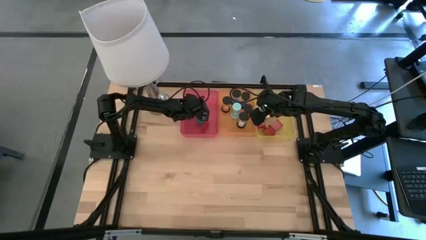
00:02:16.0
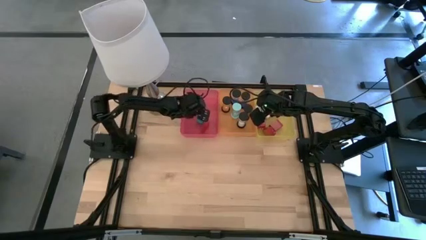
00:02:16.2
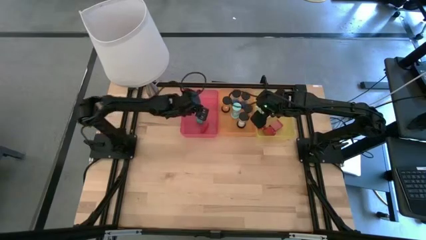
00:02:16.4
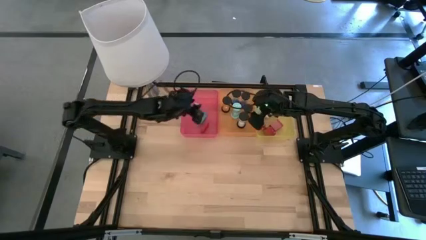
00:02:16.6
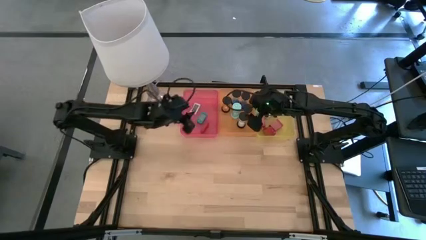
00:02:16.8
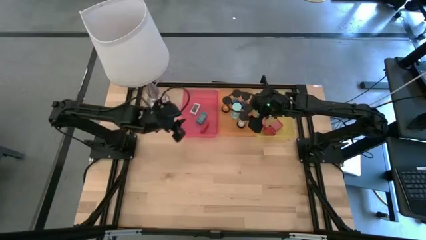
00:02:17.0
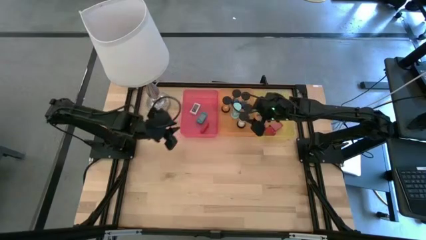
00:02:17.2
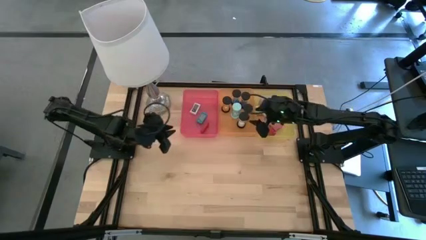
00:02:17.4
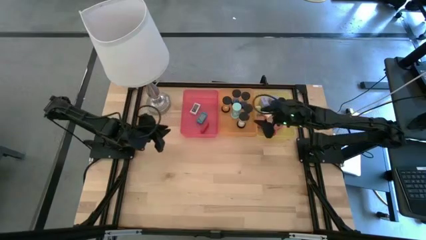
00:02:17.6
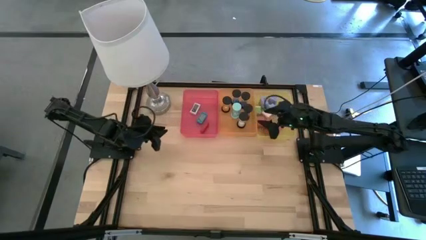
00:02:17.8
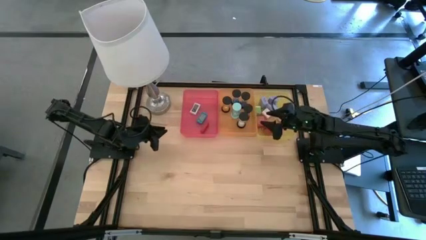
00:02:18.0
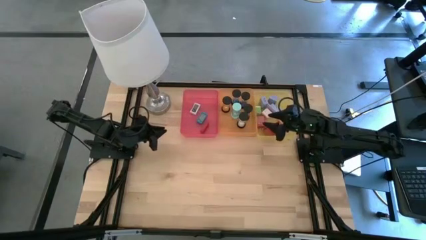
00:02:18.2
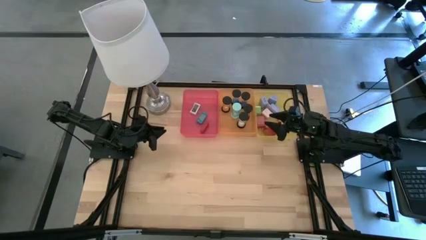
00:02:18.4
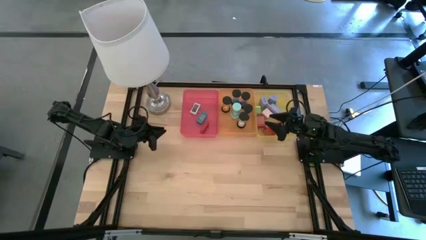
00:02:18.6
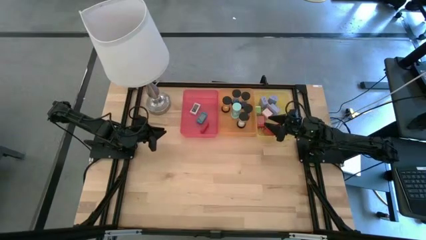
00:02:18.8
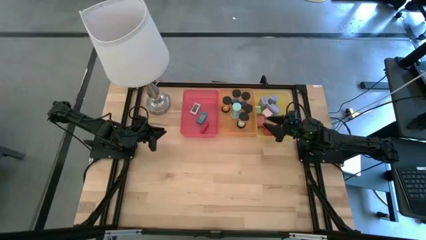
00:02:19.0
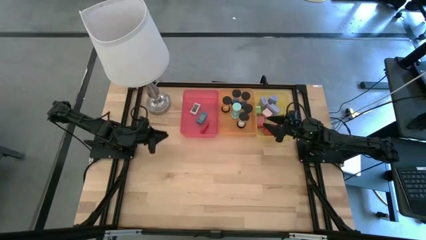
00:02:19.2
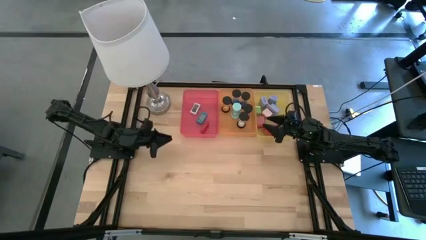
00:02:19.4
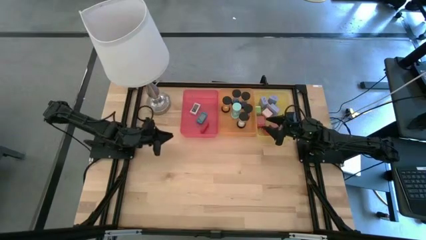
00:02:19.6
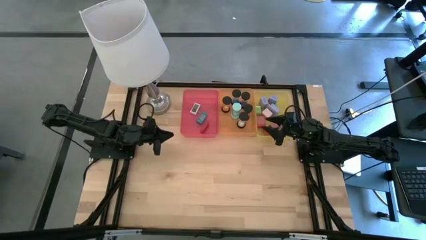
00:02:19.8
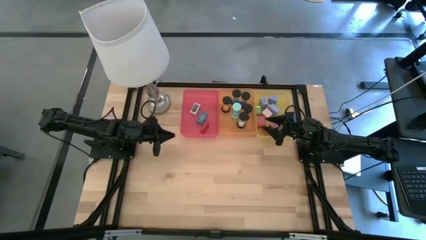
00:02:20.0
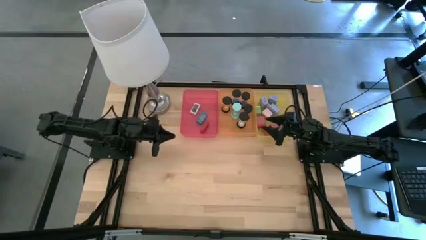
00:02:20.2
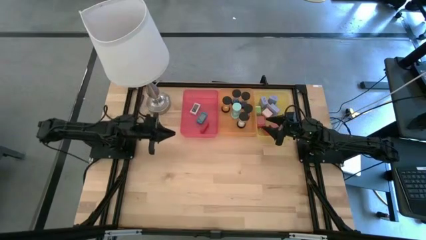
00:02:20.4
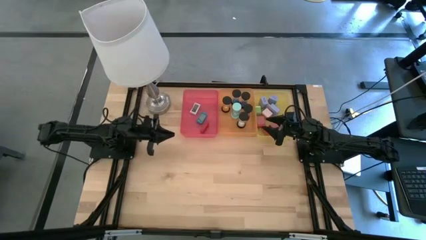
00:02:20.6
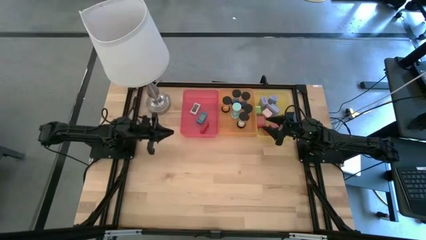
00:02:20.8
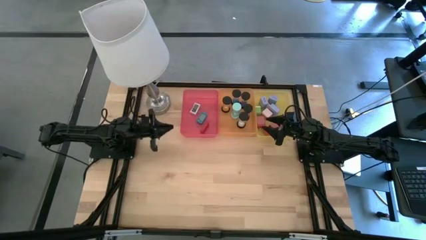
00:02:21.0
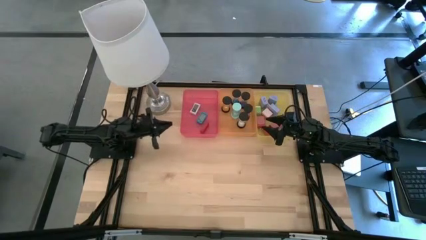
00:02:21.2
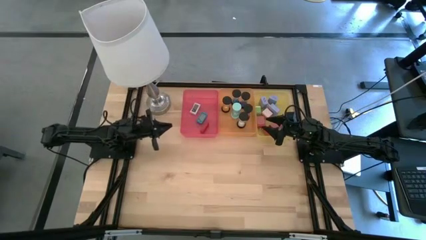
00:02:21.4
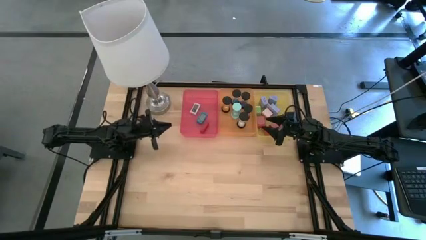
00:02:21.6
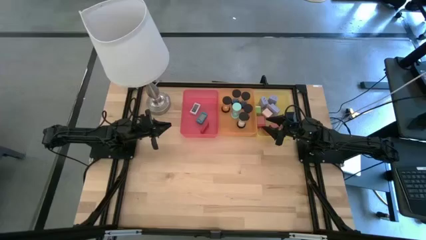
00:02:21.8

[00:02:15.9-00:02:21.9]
Task: Pick & Place Office items
Return to Home Position

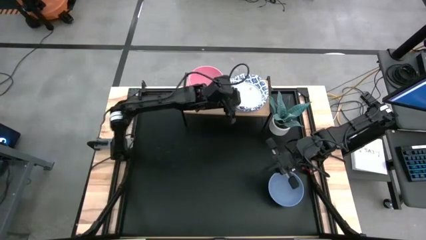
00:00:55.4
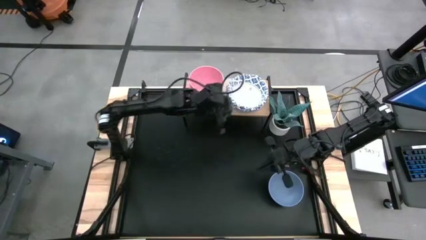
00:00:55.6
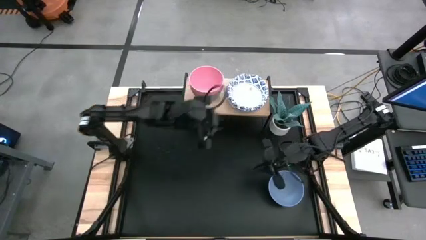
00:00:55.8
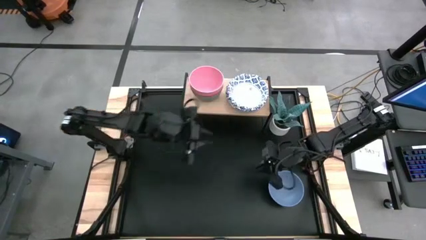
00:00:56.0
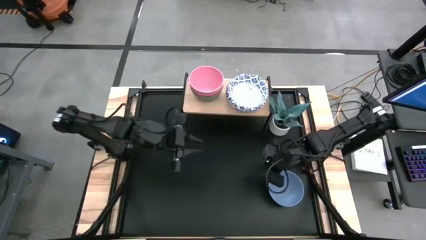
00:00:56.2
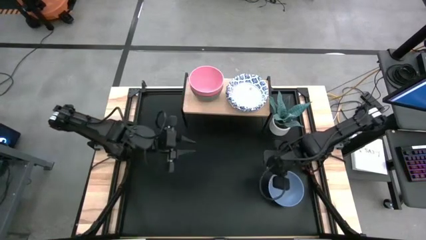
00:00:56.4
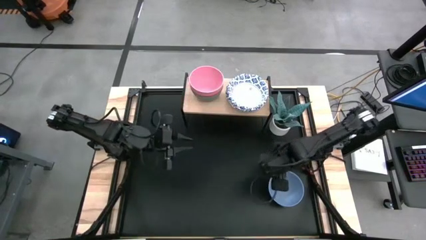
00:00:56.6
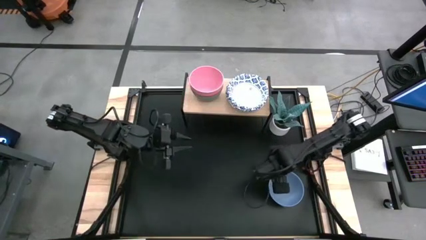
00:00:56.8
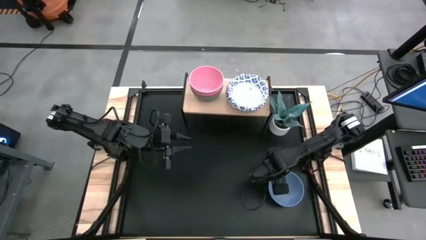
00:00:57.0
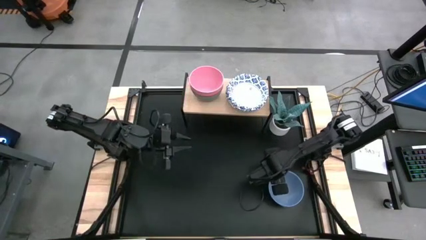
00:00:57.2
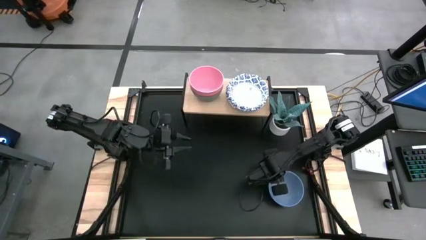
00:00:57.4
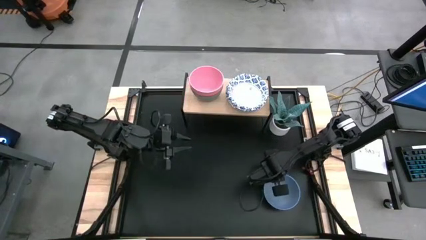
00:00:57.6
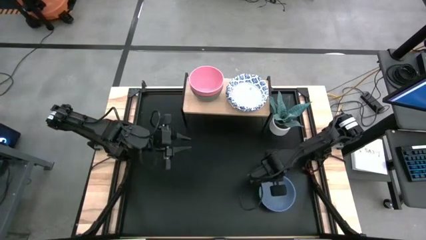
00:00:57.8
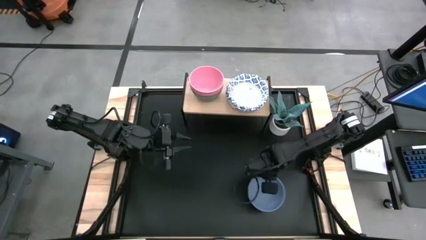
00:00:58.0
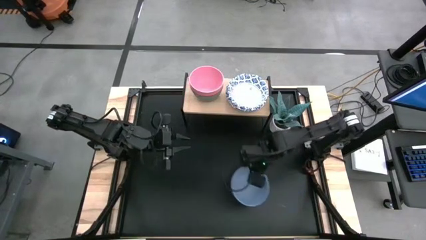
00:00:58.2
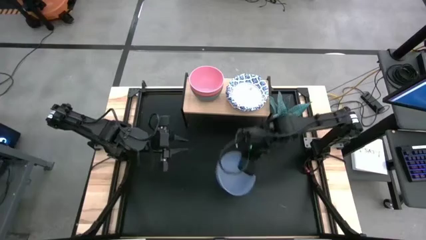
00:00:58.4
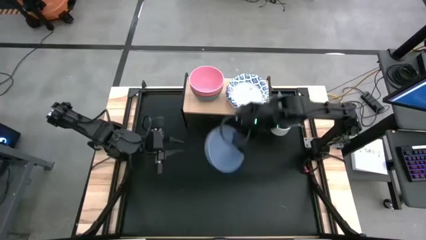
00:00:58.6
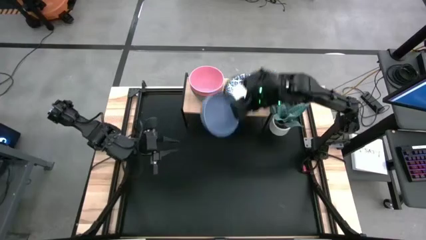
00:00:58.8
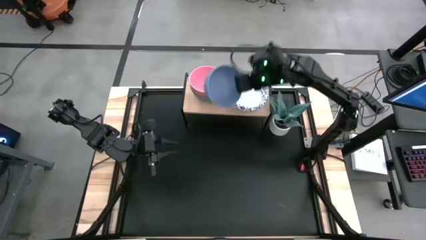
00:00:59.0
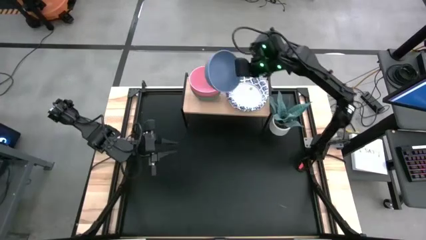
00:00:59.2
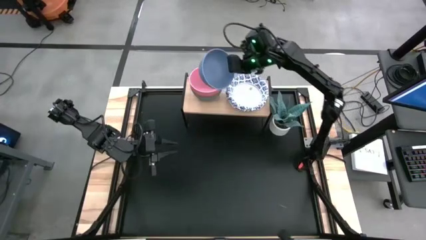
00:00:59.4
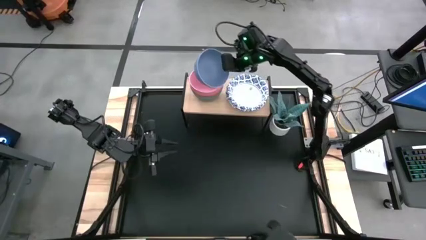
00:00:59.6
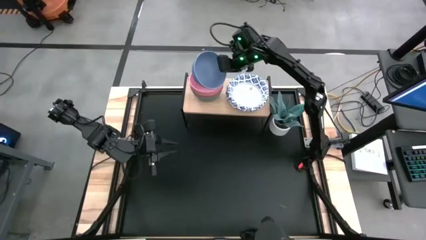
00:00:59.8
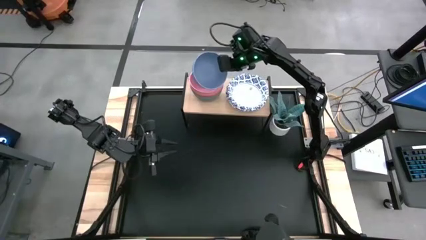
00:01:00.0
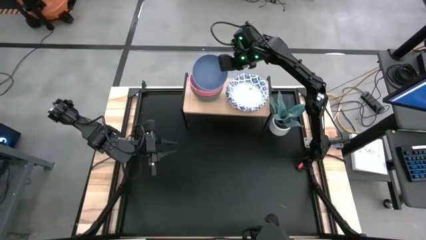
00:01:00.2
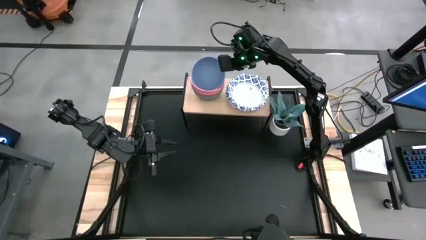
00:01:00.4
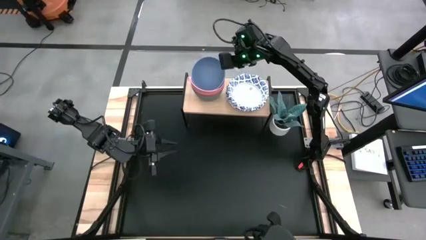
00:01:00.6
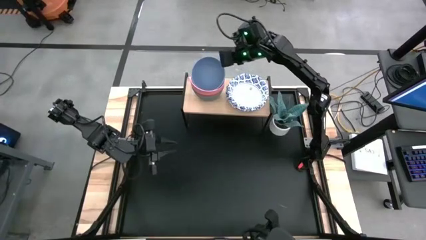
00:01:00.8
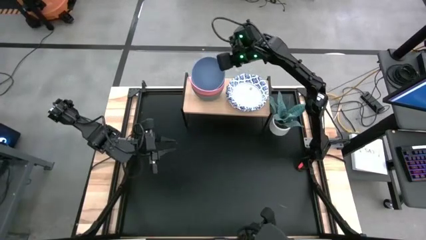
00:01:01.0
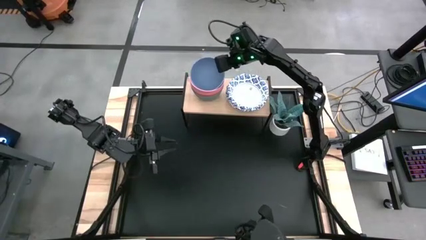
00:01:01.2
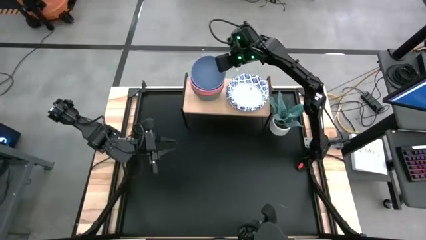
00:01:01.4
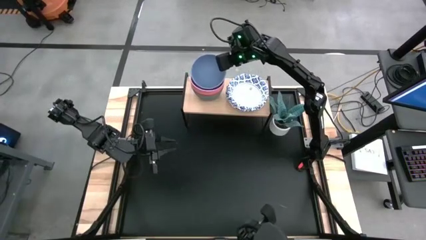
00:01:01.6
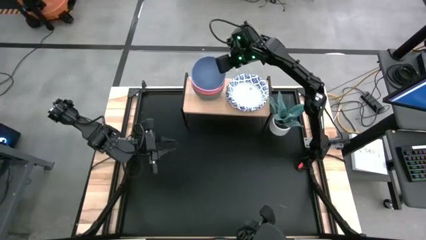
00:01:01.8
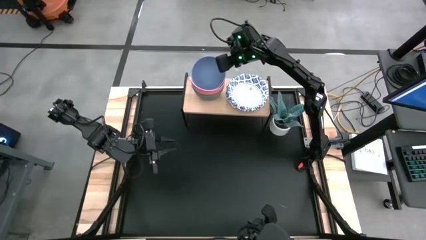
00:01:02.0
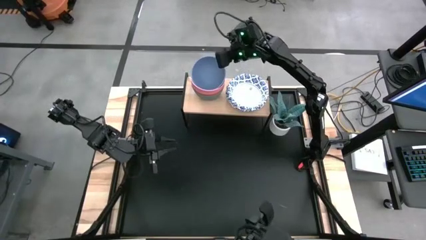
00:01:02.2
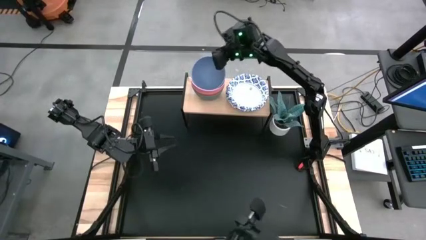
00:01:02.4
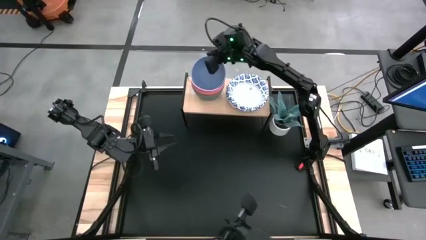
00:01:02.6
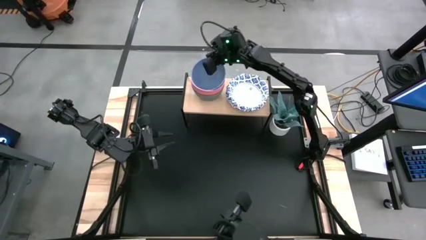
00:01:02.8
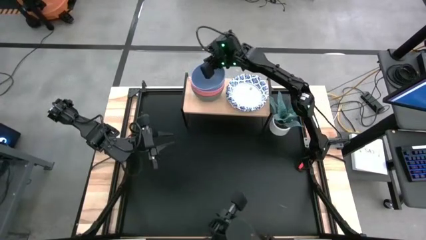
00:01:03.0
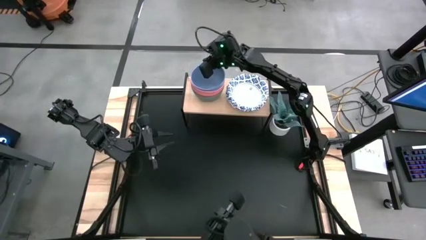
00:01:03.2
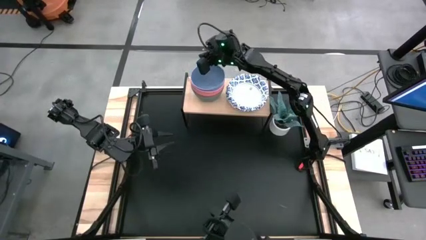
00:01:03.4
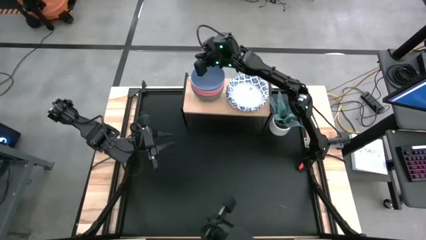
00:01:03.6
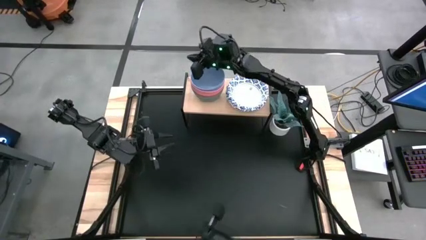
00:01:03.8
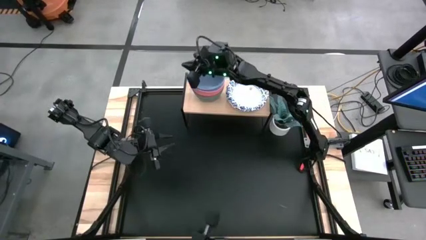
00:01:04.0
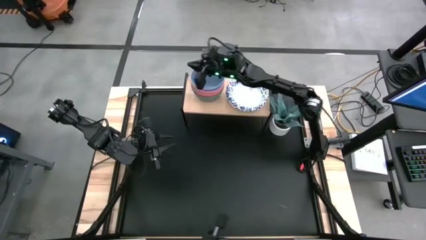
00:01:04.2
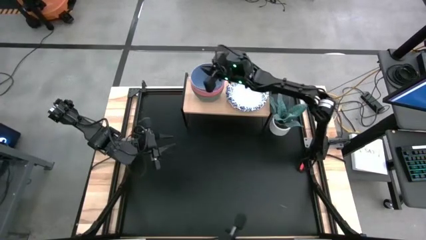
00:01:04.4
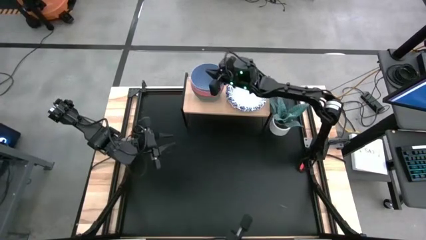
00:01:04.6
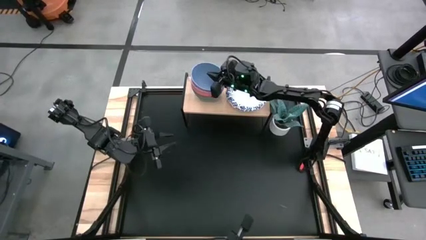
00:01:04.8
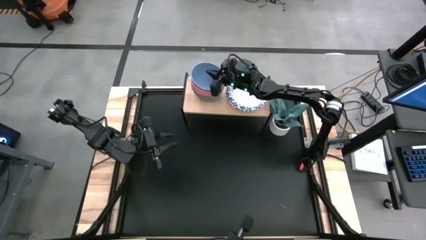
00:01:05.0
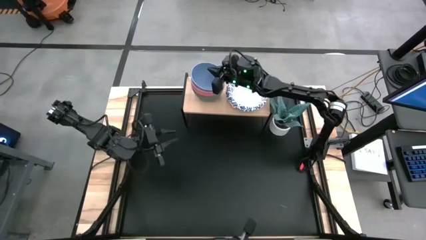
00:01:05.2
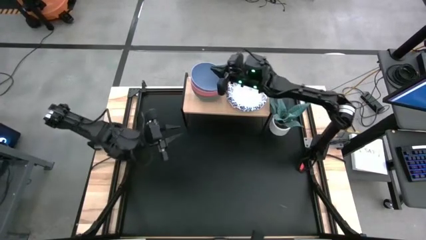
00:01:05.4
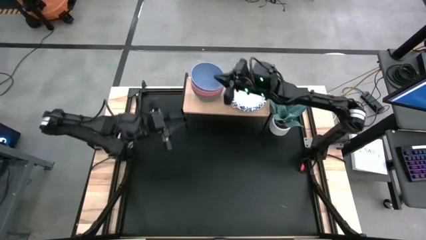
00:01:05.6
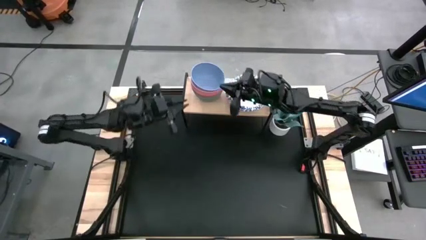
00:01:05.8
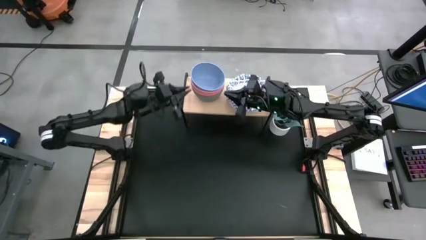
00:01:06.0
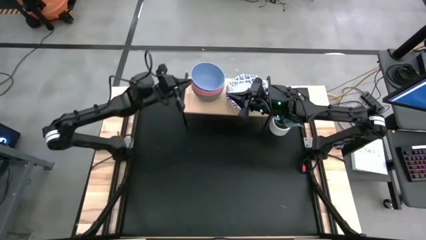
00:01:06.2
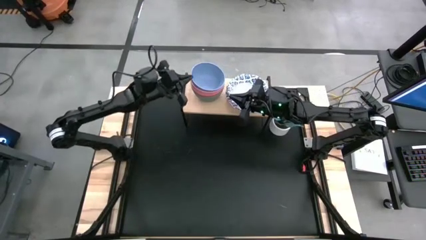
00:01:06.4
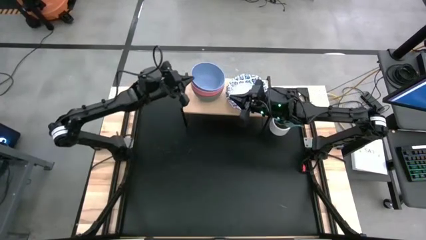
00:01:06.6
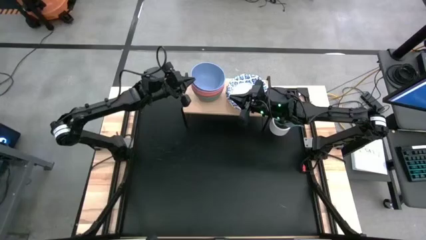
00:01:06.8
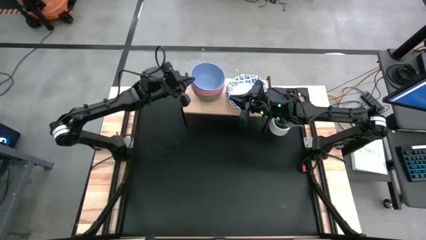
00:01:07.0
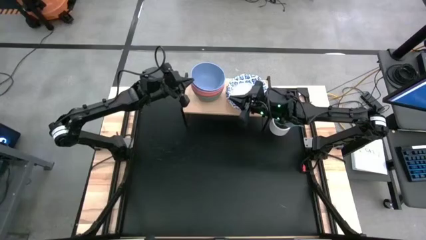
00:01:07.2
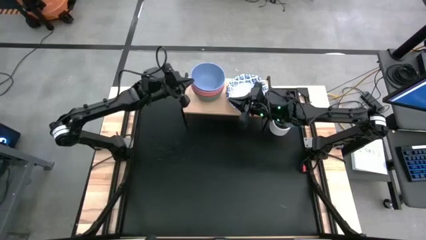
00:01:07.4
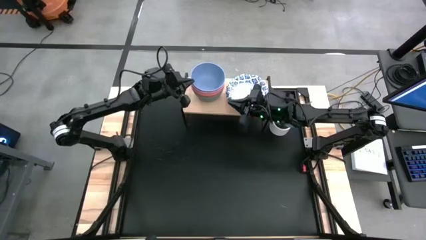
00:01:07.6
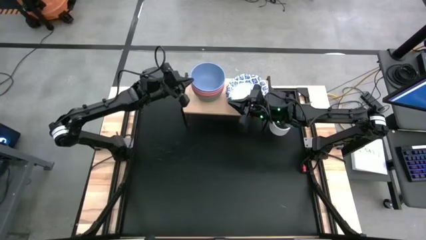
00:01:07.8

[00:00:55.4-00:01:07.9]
Task: Place and stack bowls onto a shelf
Stack the blue bowl on top of the pink bowl on the shelf
